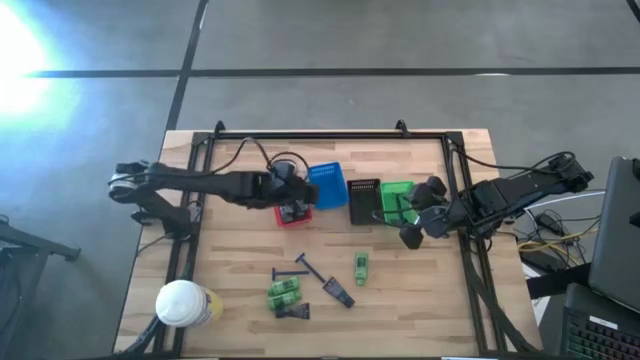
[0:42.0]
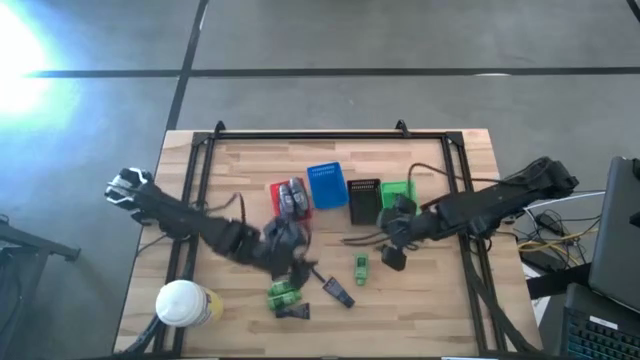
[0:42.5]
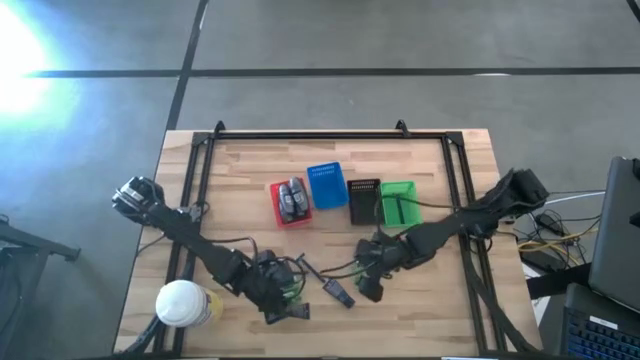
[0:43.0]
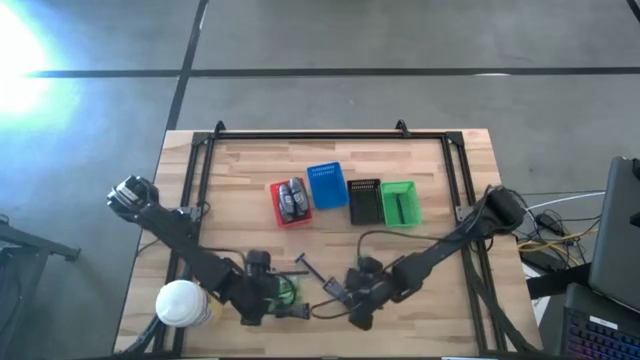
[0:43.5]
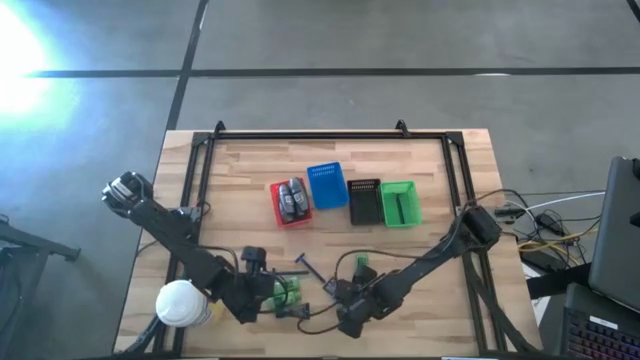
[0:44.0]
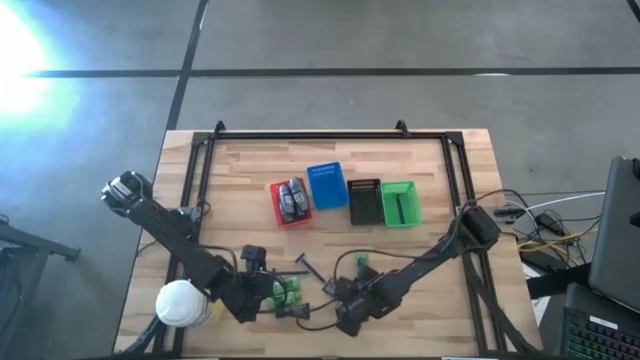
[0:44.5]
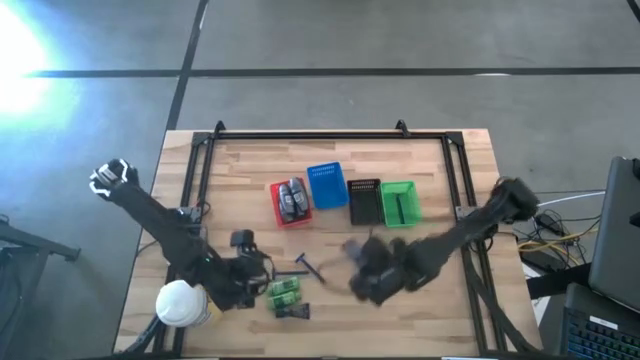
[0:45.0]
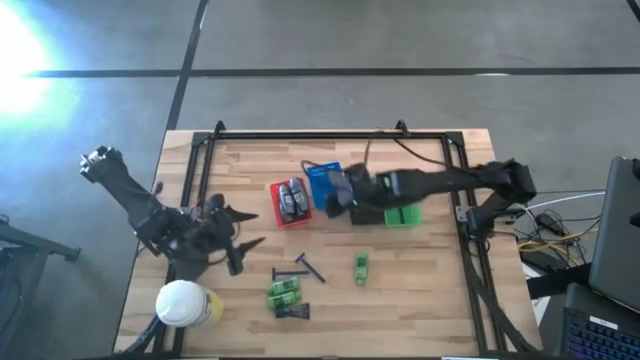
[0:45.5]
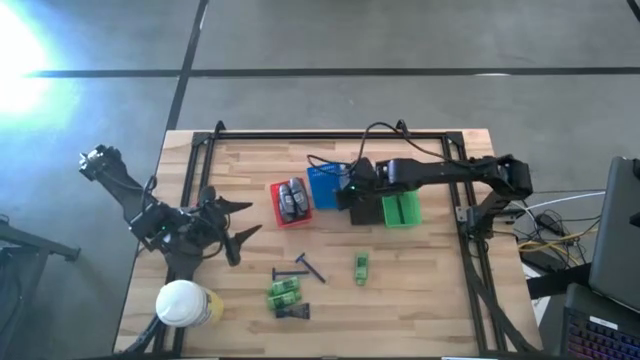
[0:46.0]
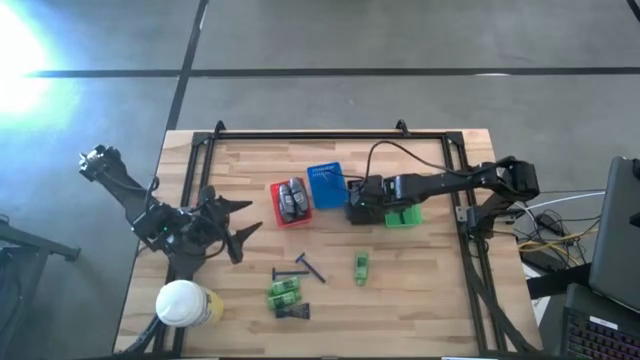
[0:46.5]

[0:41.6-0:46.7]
Task: Pick & Place Travel size toiletries
Put the blue shaving cream into the black bin

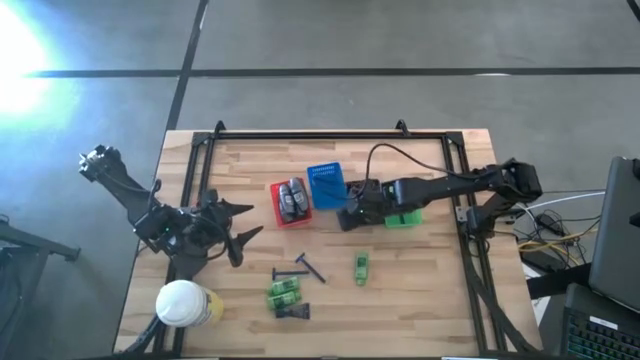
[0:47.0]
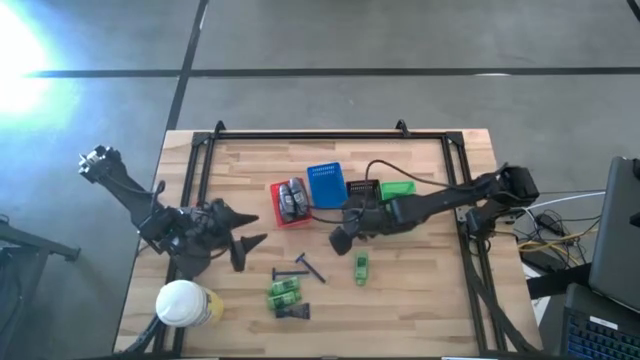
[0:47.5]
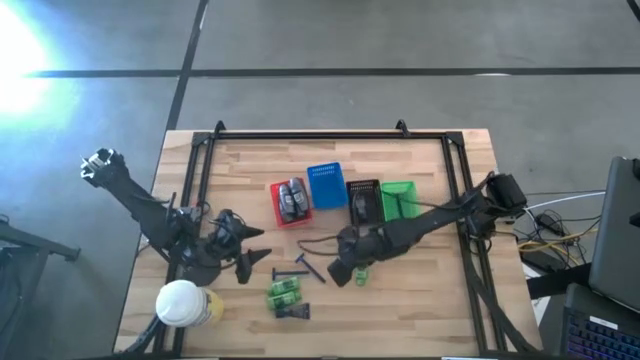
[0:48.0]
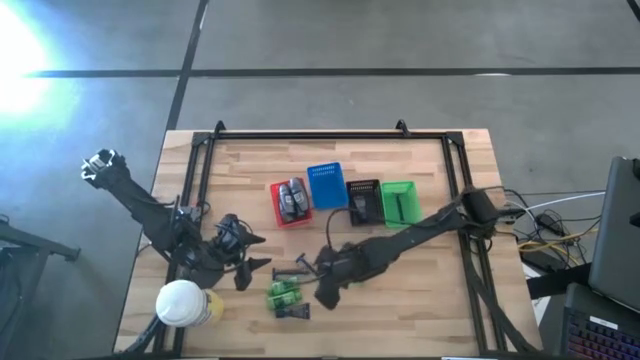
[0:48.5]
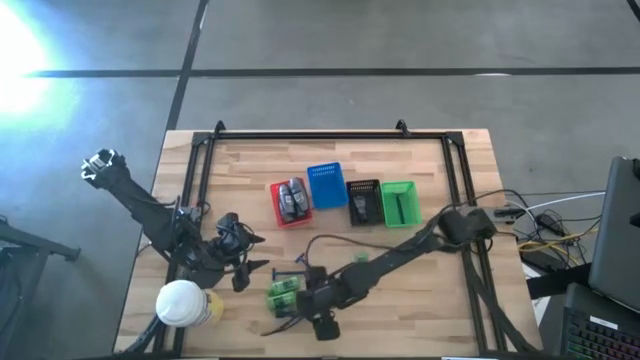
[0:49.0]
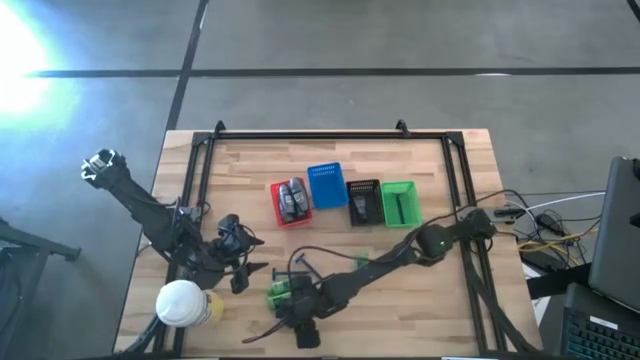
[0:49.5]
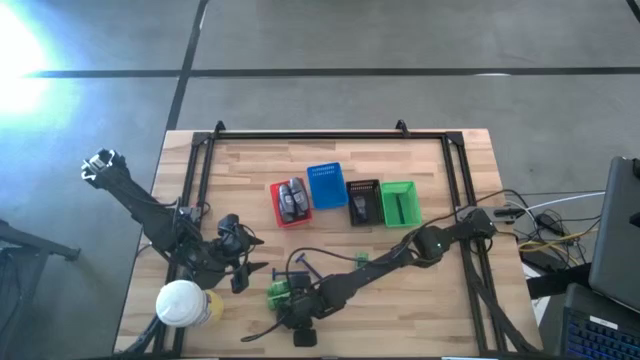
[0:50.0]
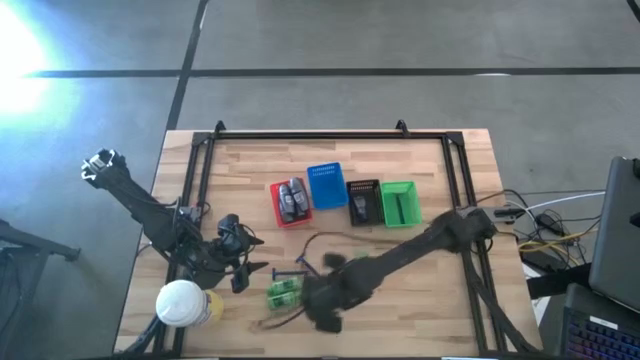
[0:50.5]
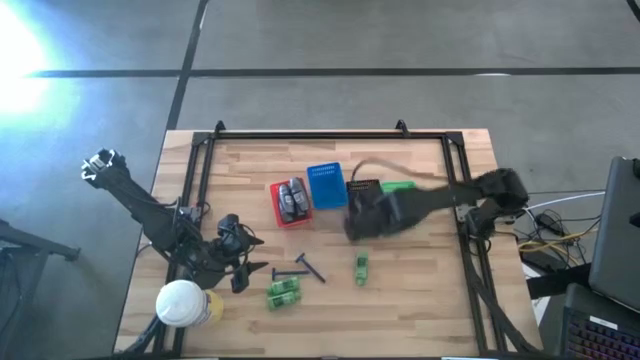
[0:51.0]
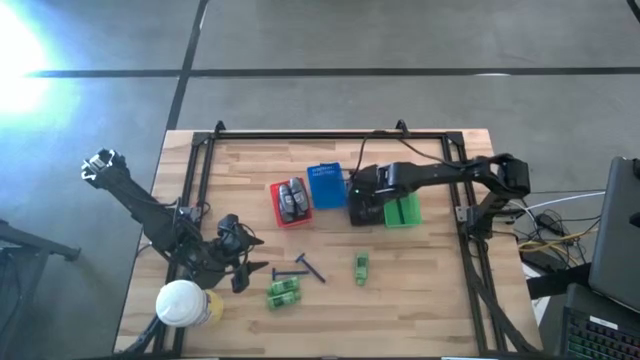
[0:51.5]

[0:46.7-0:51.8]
Put the blue shave cream into the black bin

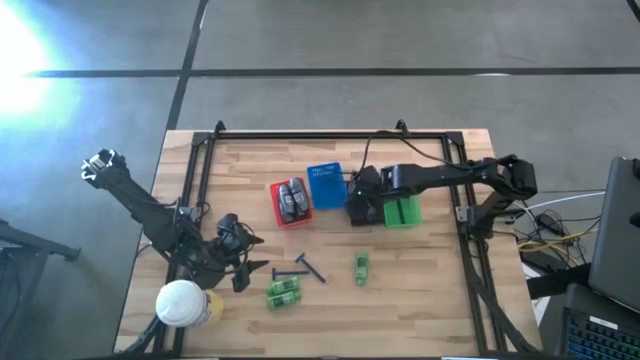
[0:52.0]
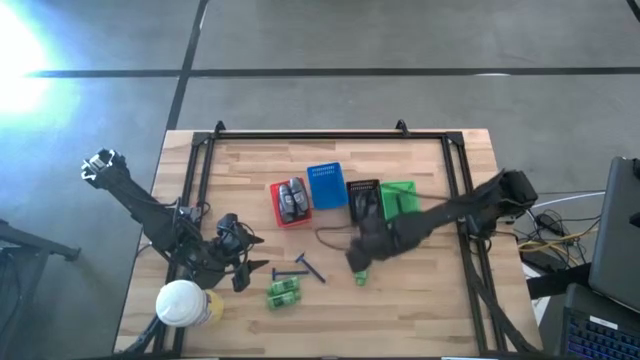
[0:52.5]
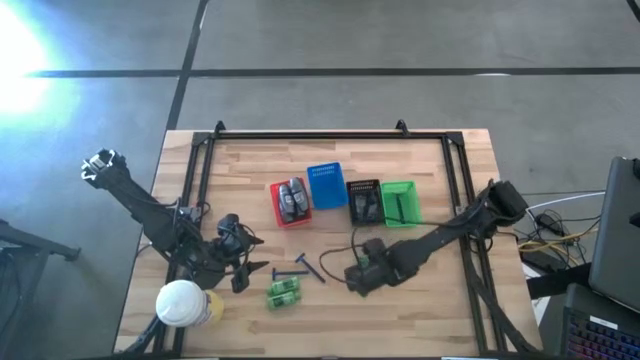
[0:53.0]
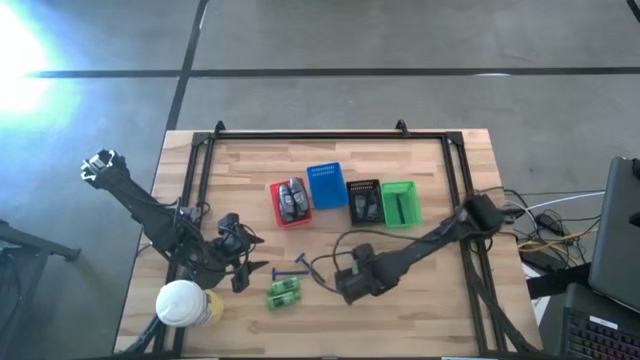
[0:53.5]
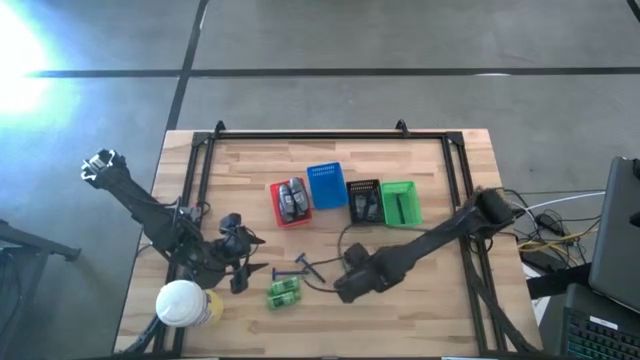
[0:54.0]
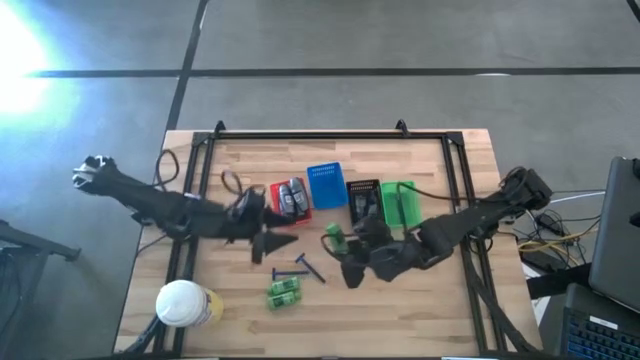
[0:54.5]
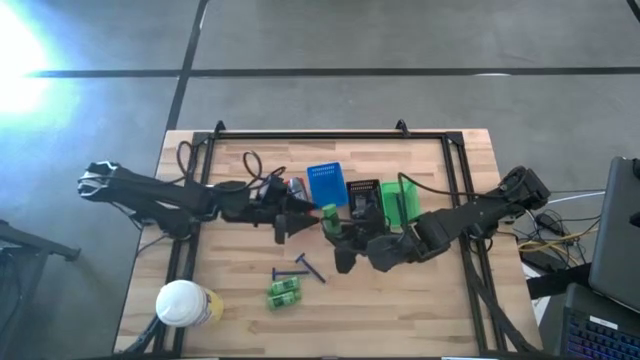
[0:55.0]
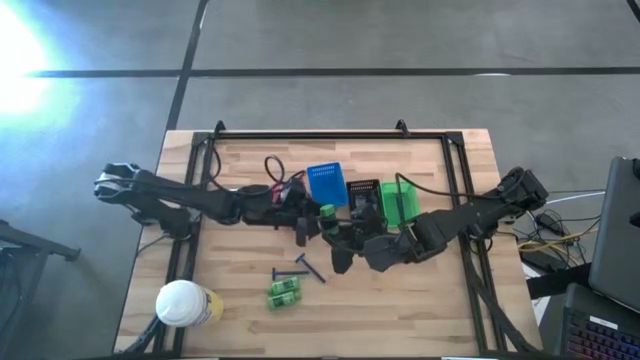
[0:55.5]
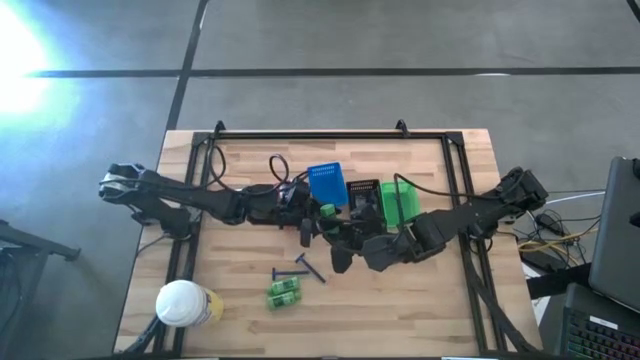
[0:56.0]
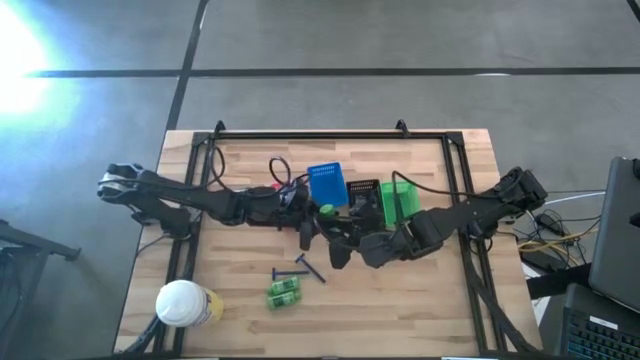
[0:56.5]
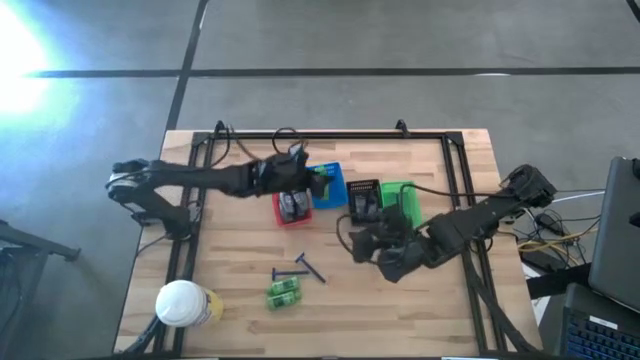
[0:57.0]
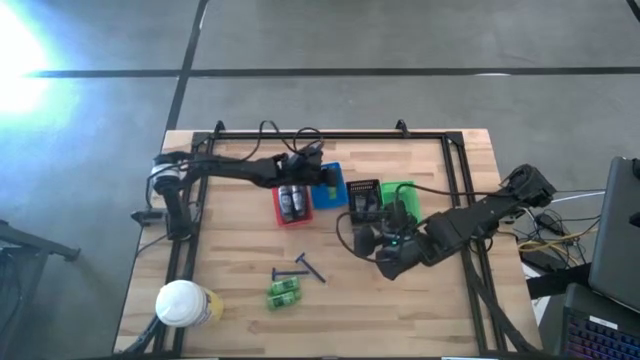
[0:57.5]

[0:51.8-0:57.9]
Put the green shampoo into the blue bin

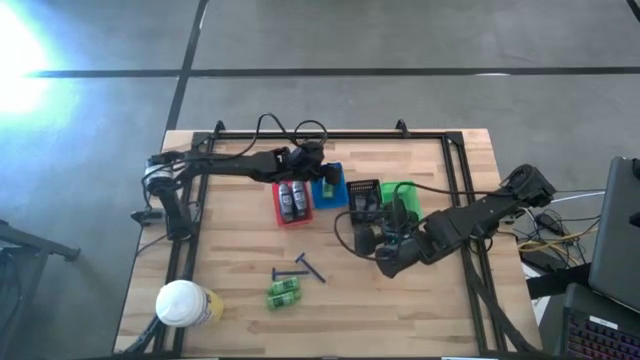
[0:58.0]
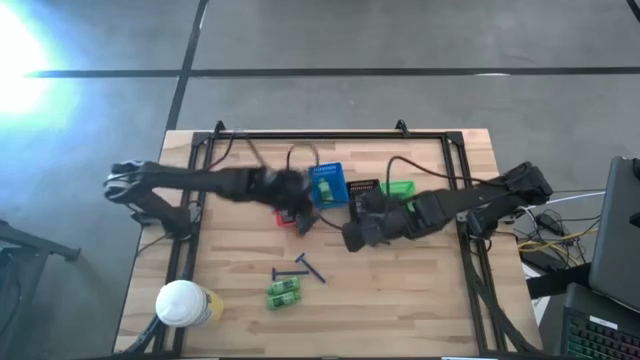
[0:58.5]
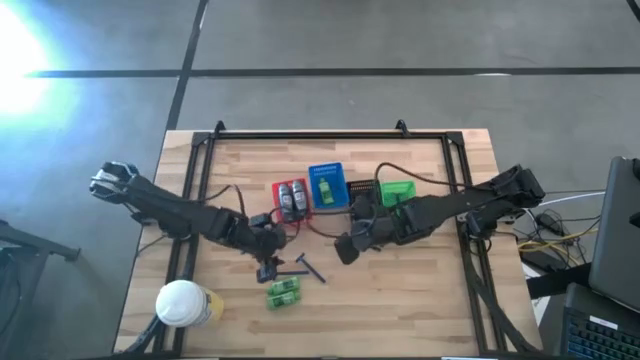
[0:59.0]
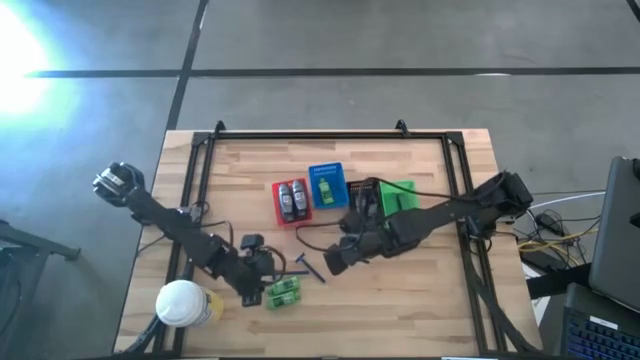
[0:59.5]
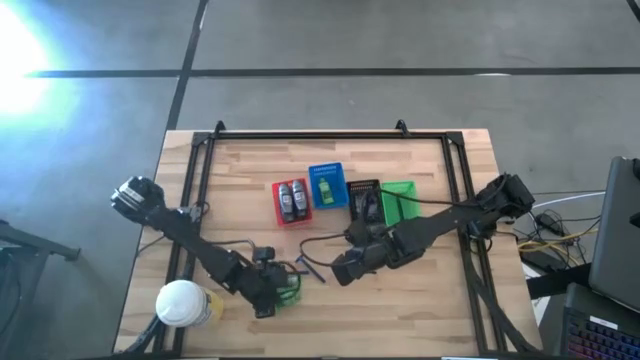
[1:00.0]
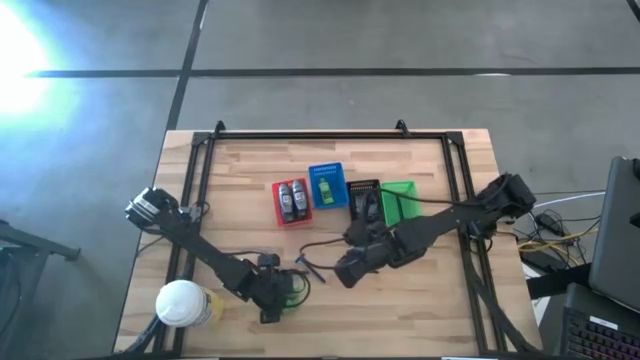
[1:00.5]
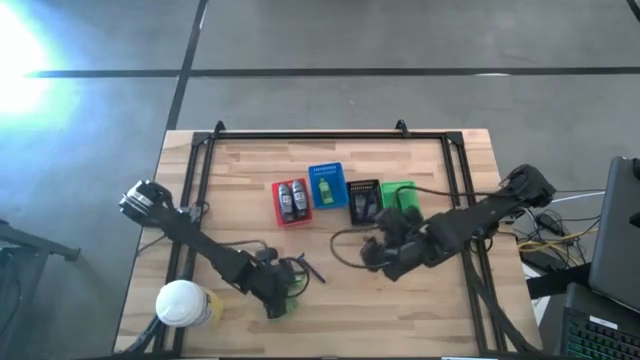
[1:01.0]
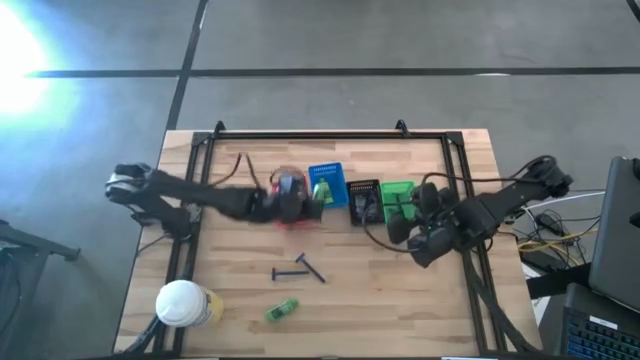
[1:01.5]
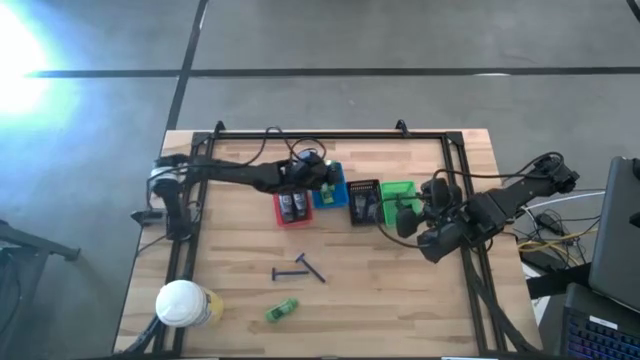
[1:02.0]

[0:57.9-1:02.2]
Put the green shampoo into the blue bin

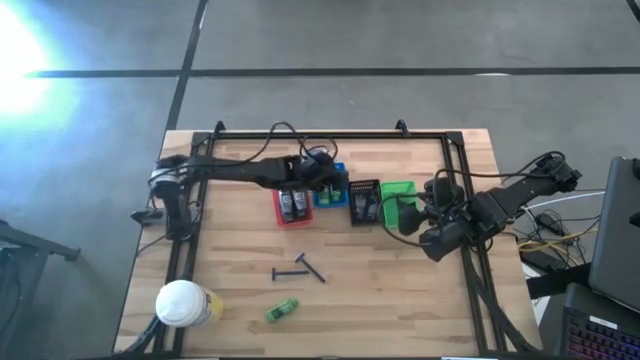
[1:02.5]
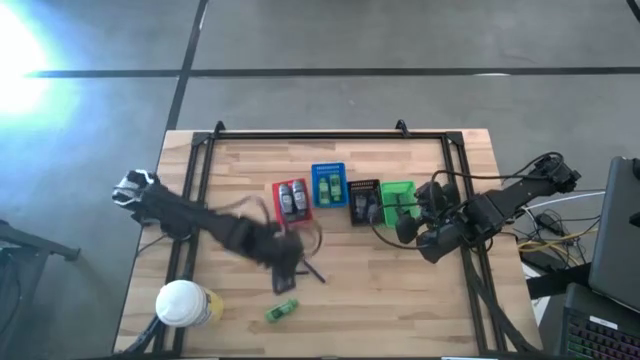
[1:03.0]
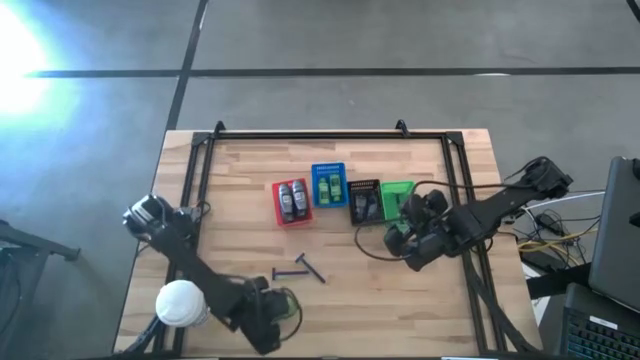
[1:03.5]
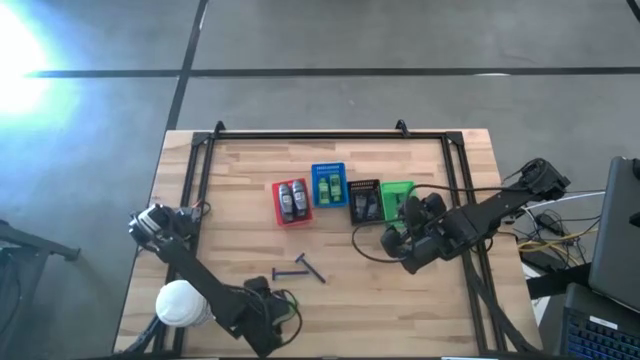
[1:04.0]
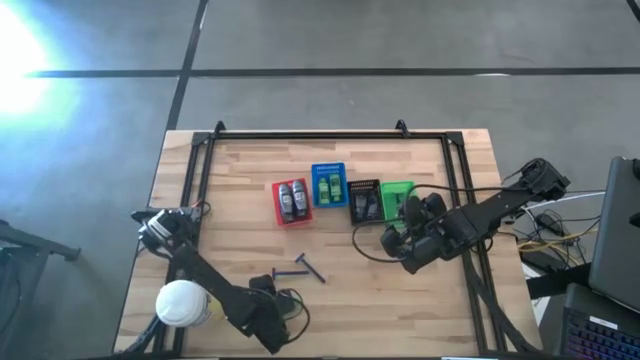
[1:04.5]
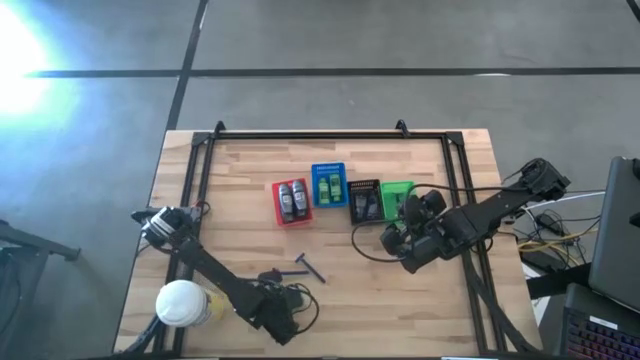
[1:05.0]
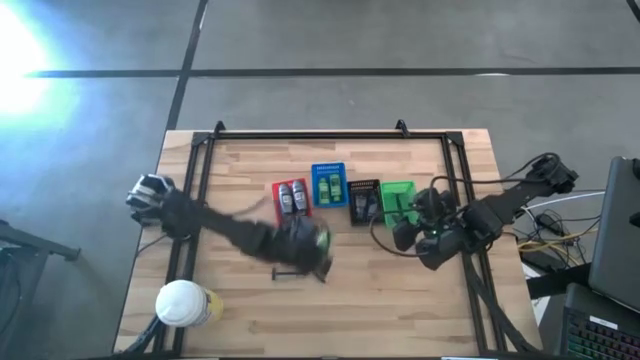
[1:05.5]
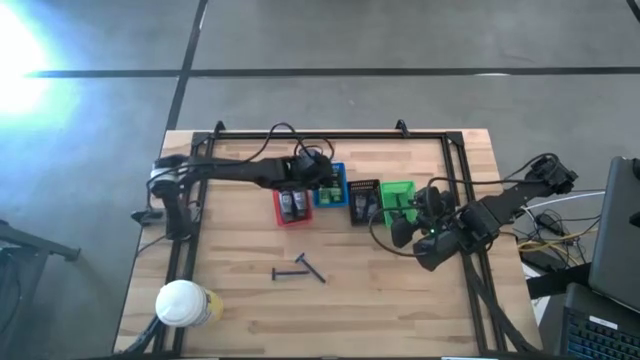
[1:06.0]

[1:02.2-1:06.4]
Put the green shampoo into the blue bin
